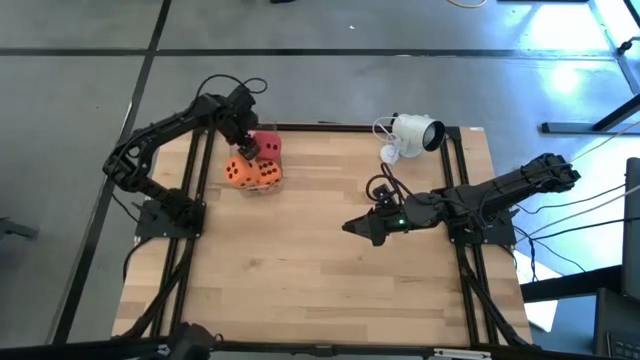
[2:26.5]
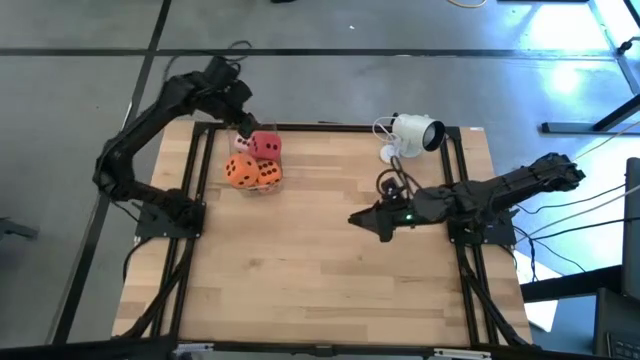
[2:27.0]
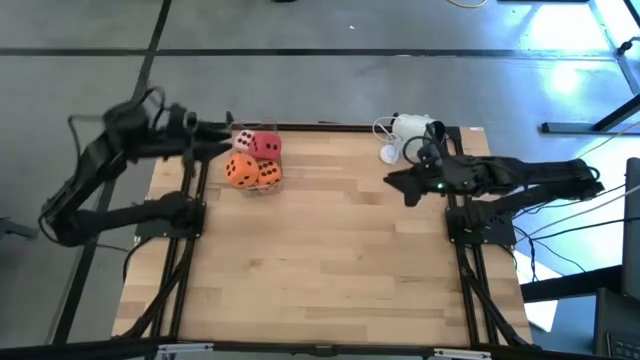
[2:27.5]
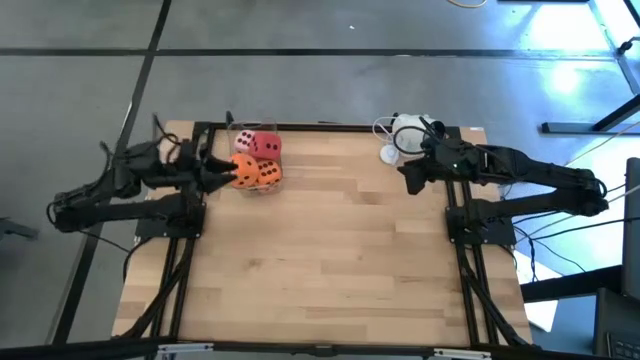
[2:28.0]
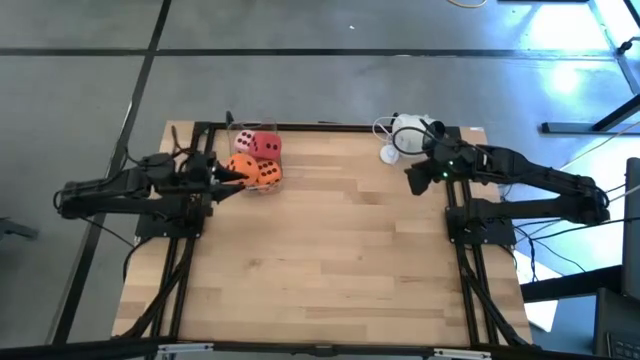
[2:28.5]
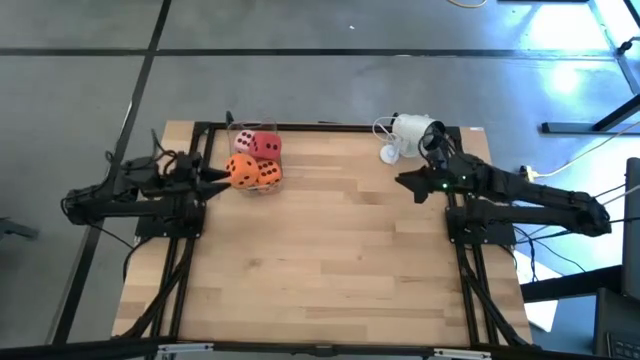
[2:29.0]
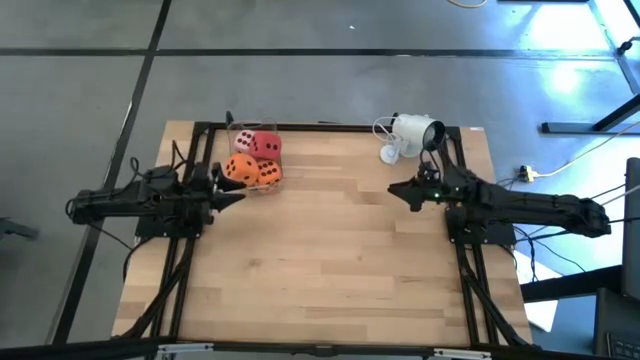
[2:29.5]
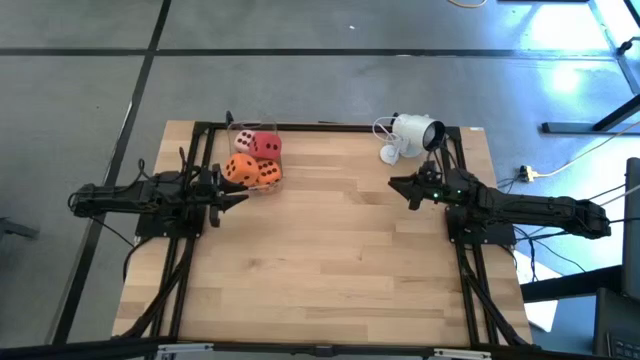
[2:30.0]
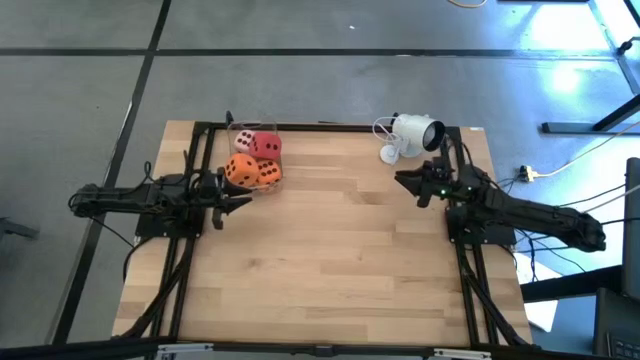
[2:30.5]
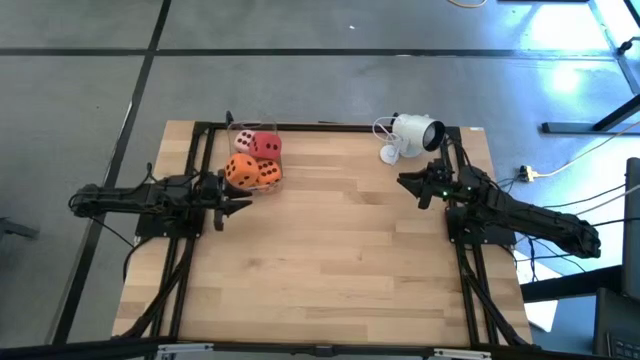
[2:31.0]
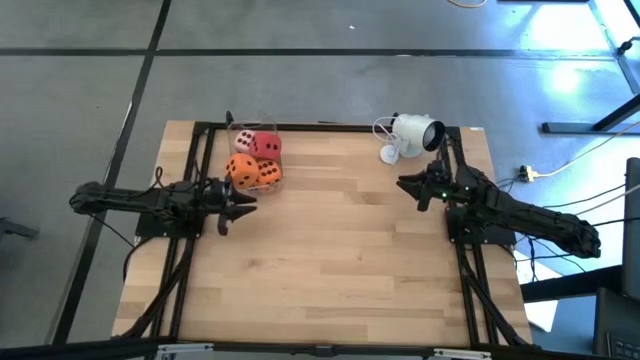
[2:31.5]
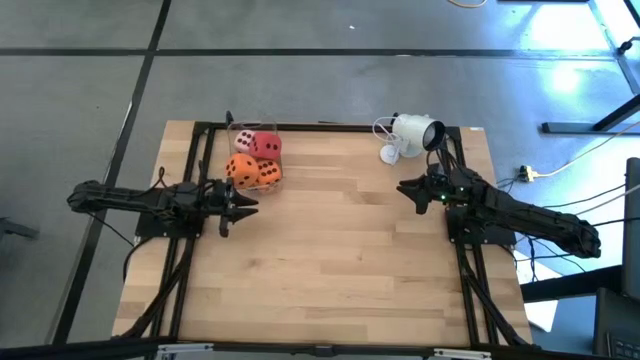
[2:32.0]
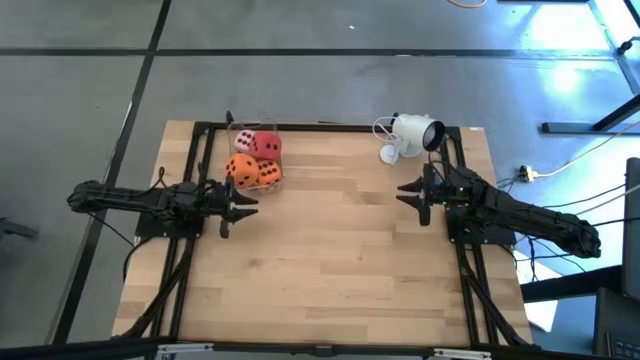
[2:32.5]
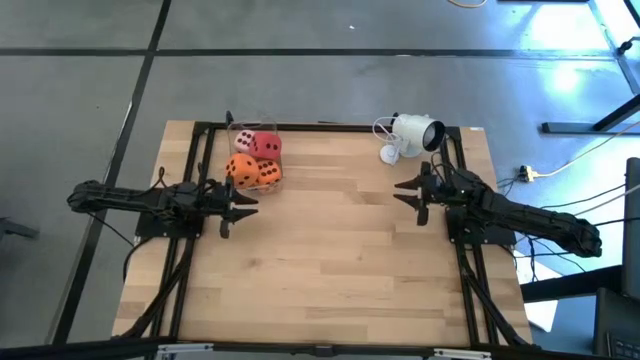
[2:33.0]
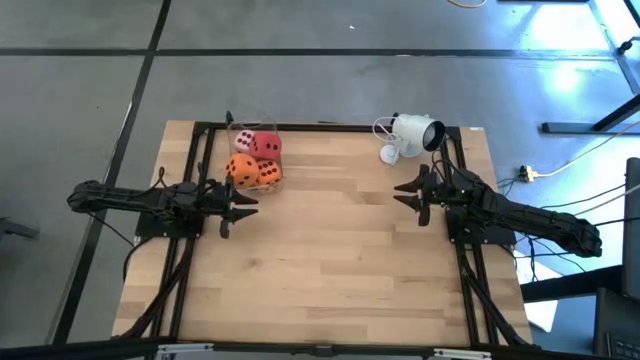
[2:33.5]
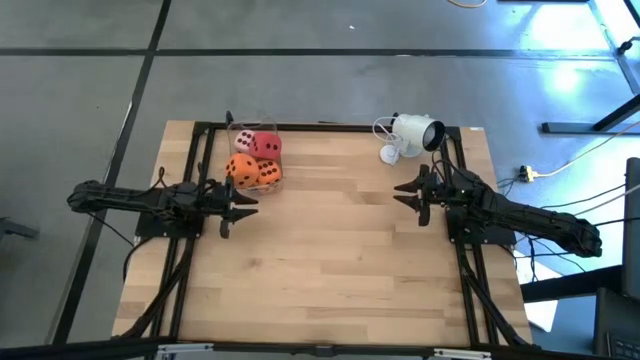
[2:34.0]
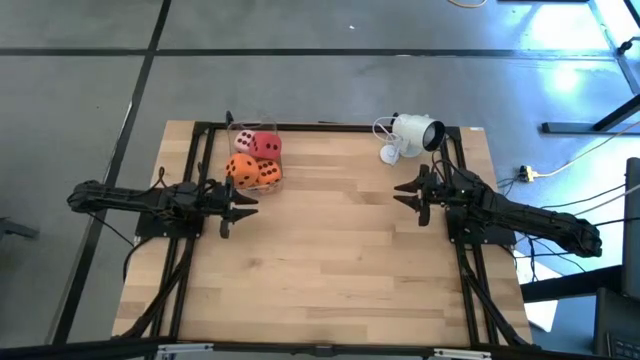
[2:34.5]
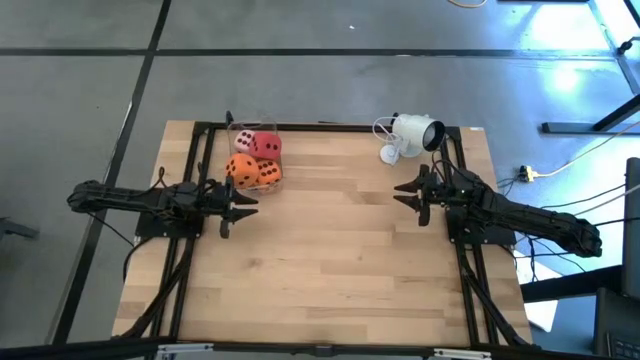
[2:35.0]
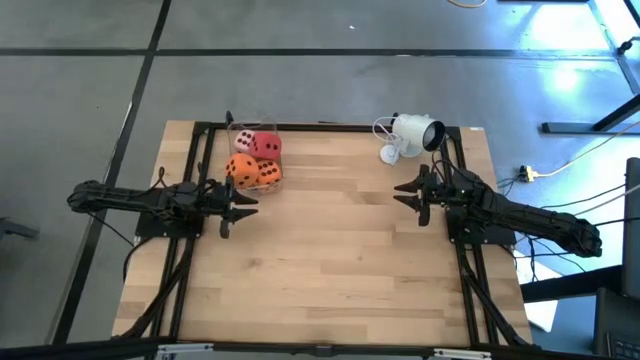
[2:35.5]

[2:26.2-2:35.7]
Task: Pick & Place Dice
Return to Home Position

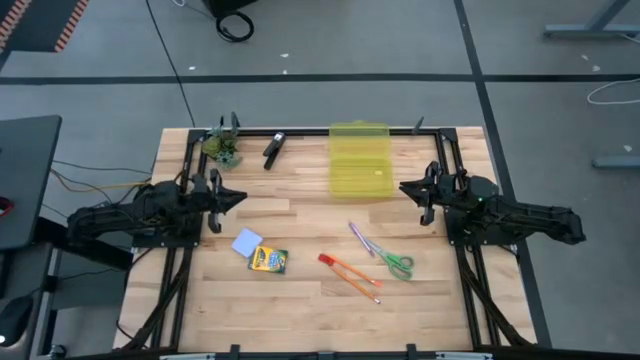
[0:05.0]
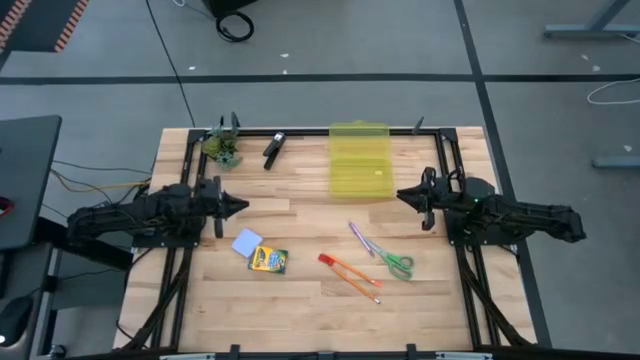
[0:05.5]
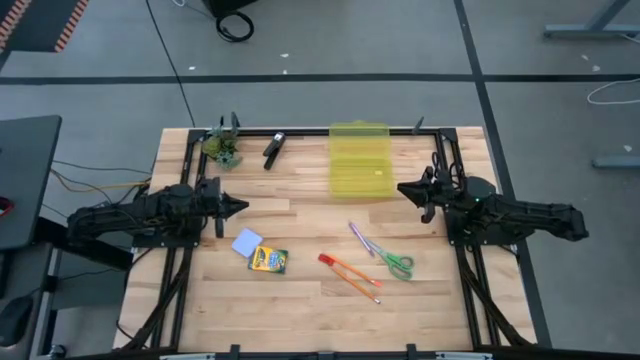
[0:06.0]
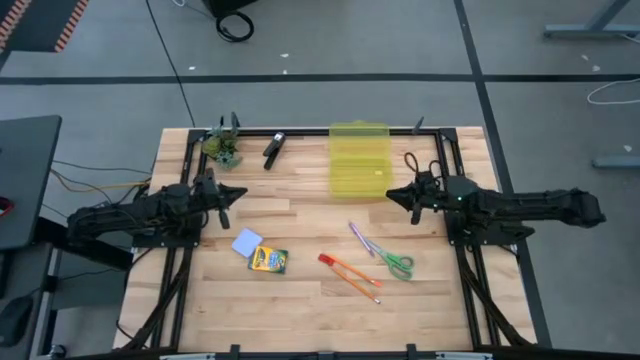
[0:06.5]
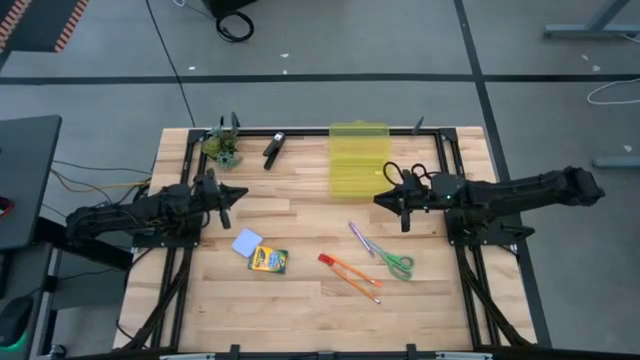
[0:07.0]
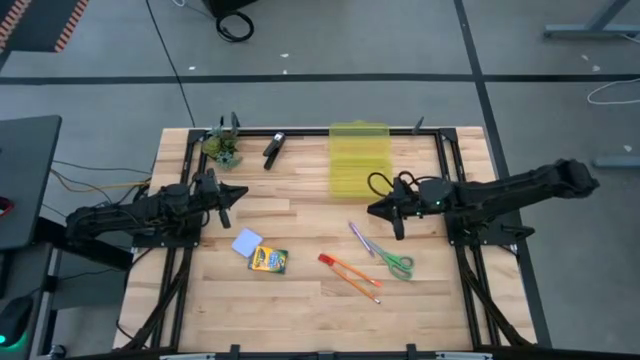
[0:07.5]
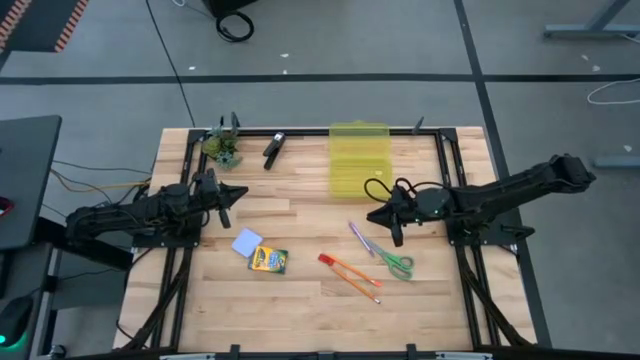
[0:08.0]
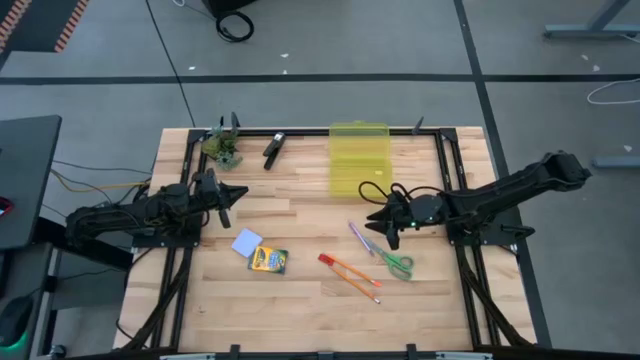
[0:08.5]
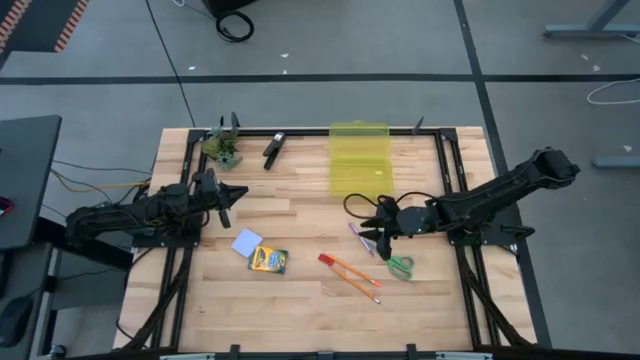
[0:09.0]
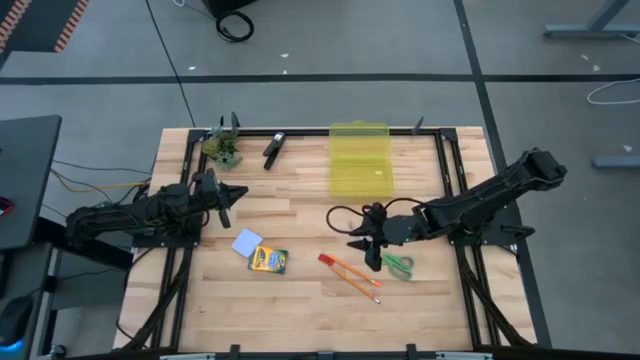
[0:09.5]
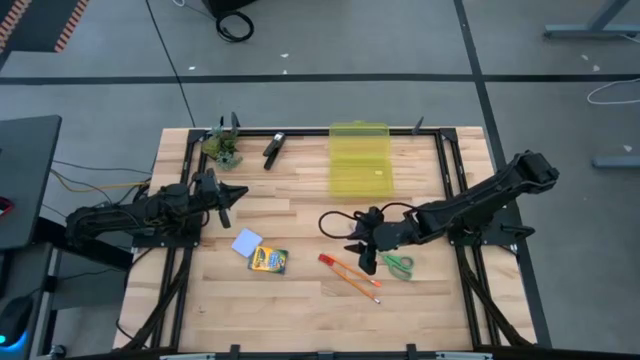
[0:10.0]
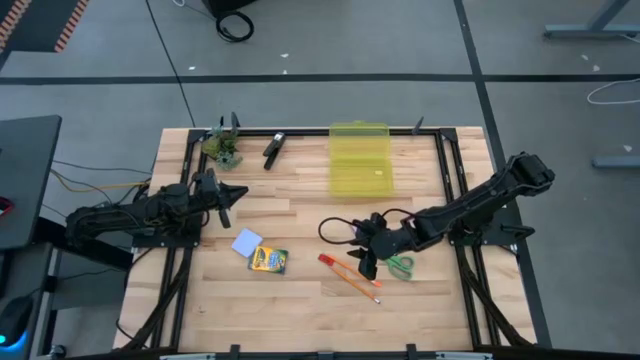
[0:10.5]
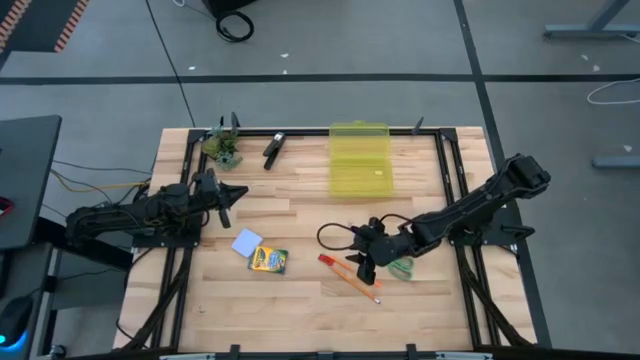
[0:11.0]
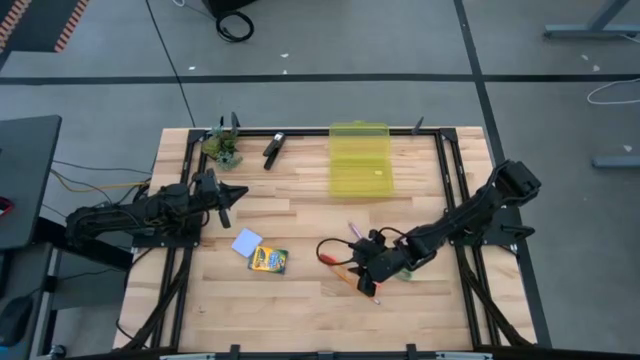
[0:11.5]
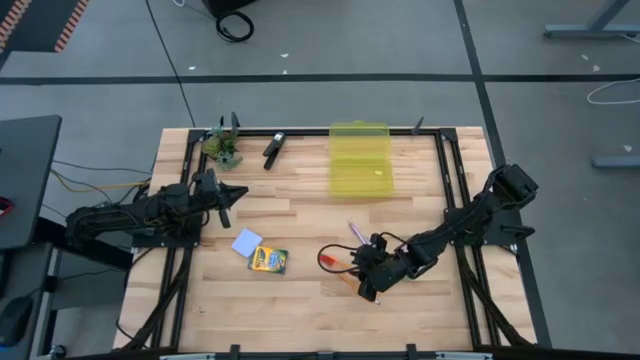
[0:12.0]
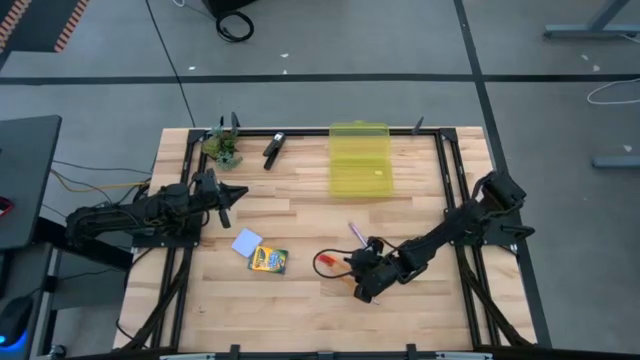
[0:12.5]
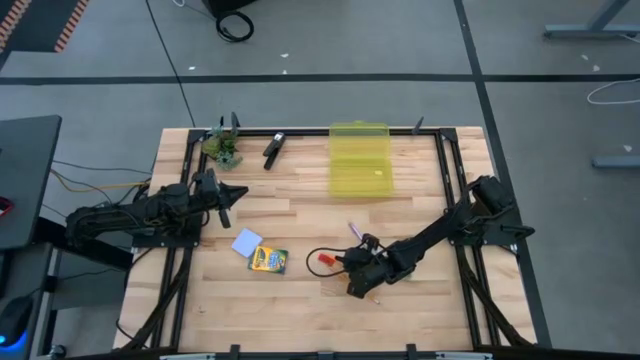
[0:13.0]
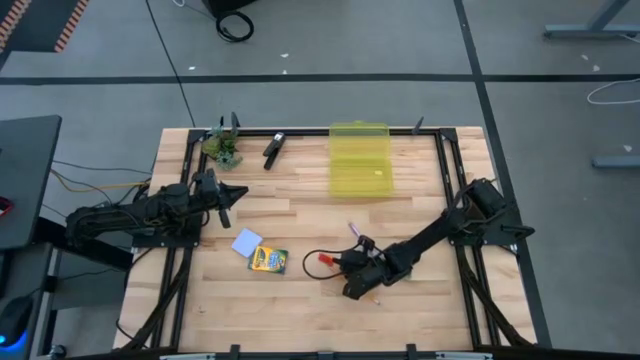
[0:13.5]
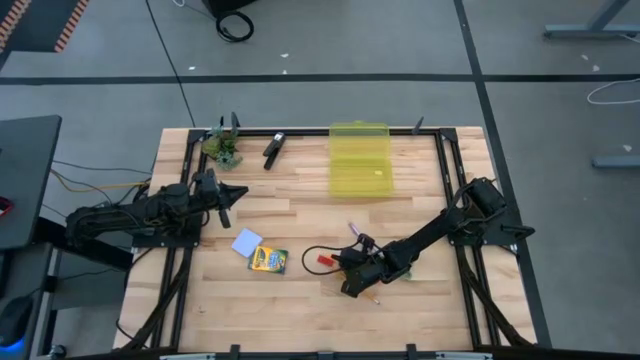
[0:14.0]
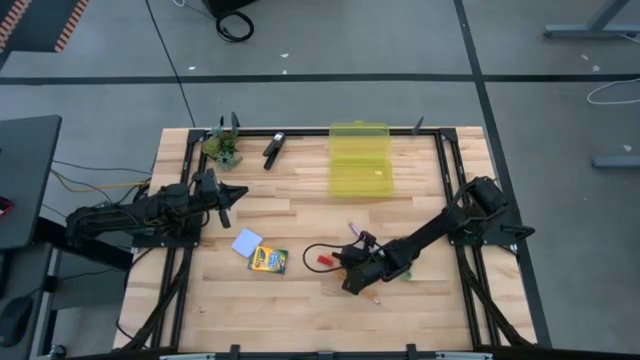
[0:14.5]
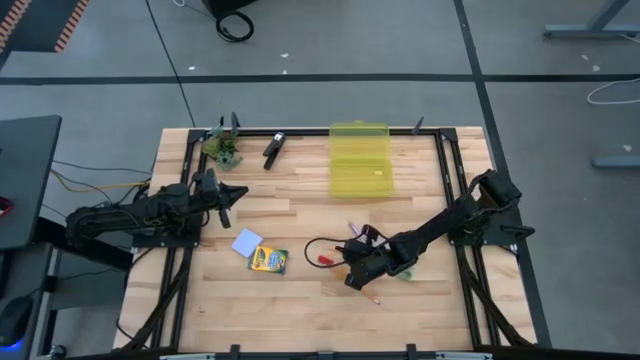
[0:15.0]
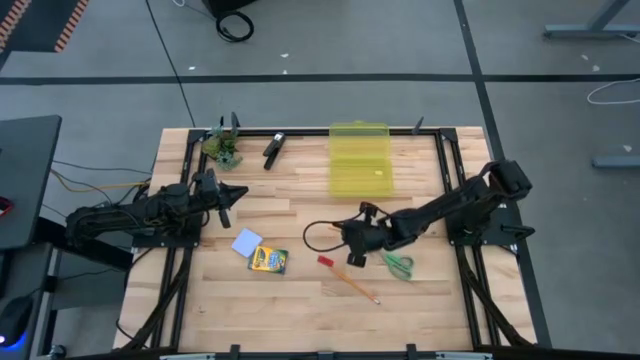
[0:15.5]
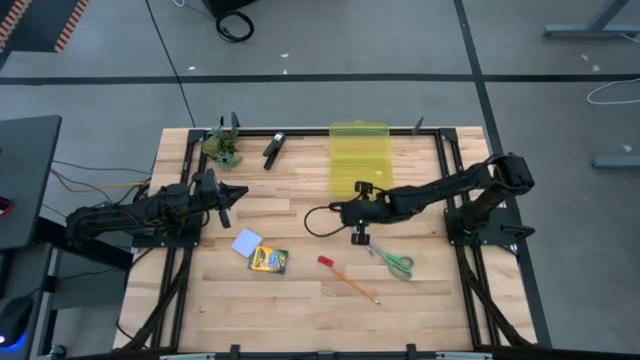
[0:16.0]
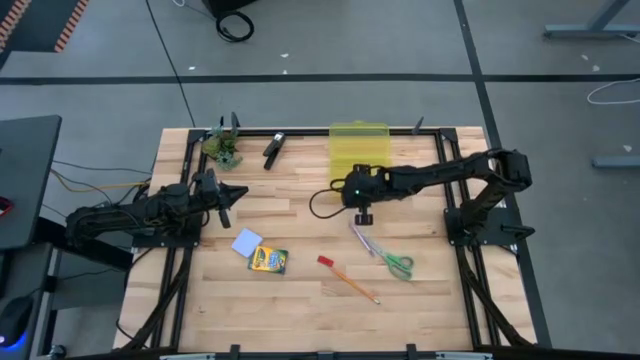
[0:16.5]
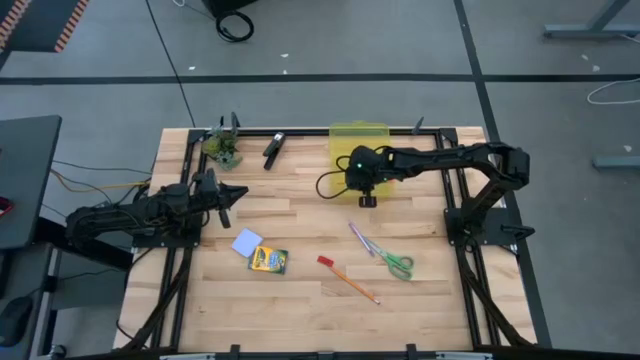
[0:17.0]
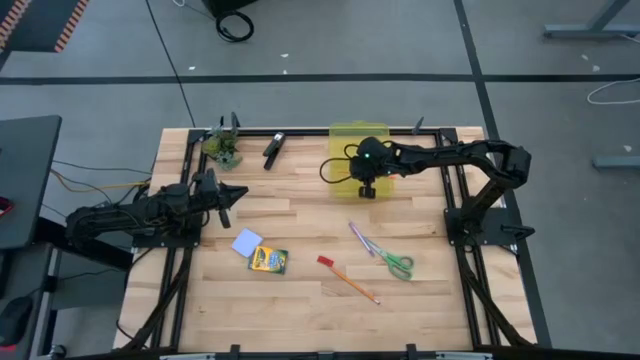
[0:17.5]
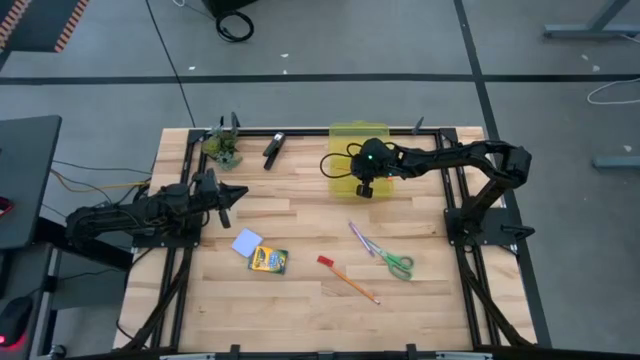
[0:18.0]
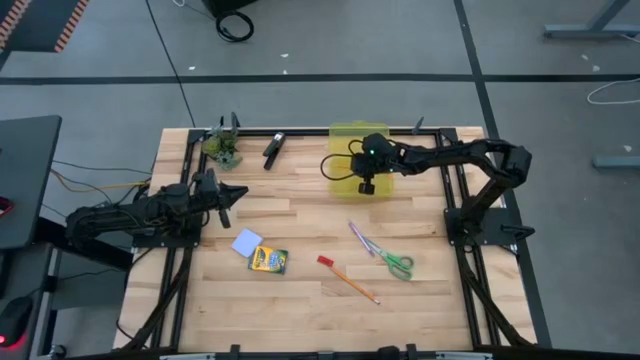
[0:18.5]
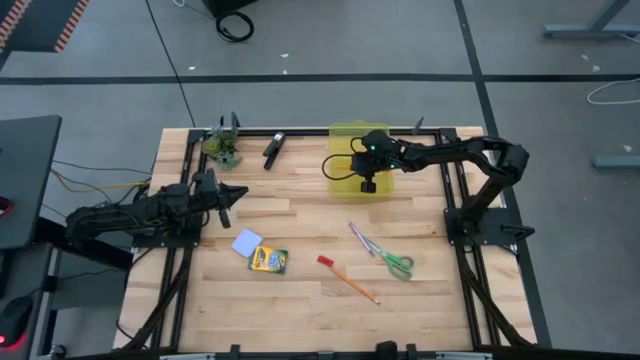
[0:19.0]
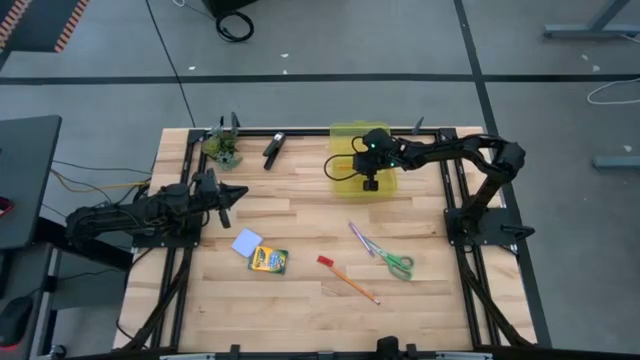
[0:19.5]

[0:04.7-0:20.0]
Task: Pack school essentials
Put the top yellow pencil into the yellow supply box
